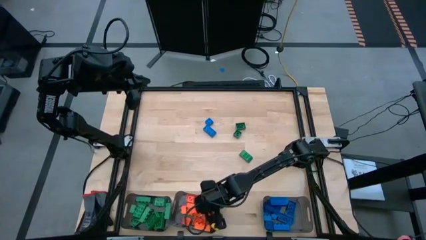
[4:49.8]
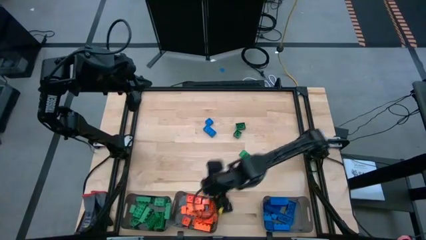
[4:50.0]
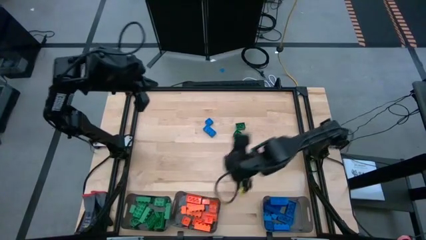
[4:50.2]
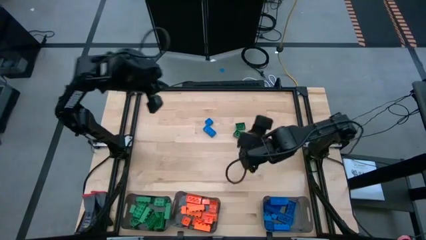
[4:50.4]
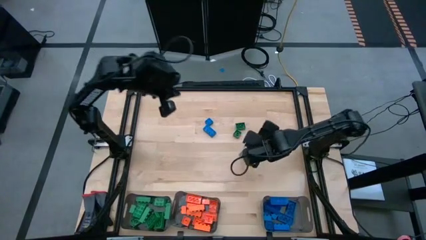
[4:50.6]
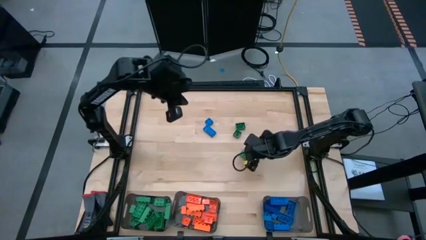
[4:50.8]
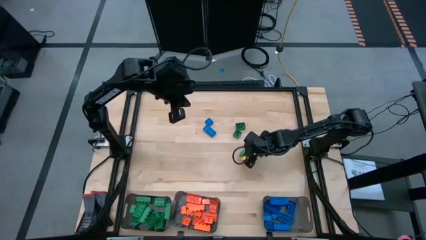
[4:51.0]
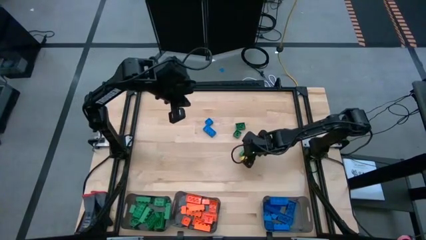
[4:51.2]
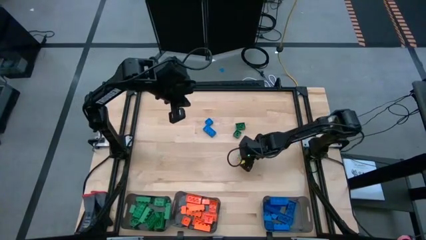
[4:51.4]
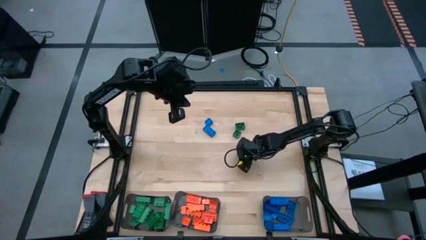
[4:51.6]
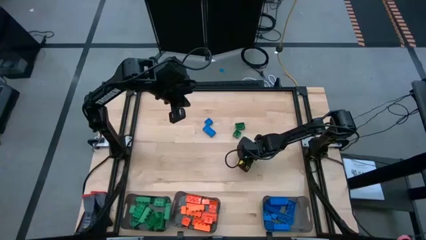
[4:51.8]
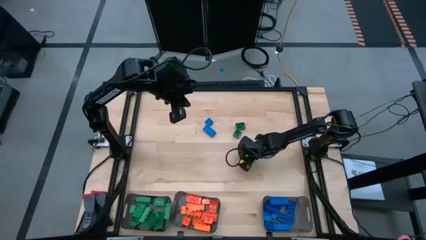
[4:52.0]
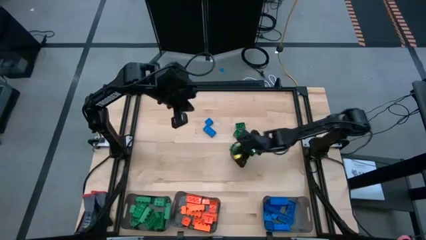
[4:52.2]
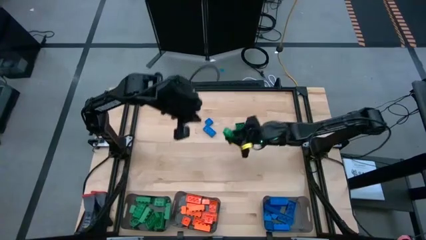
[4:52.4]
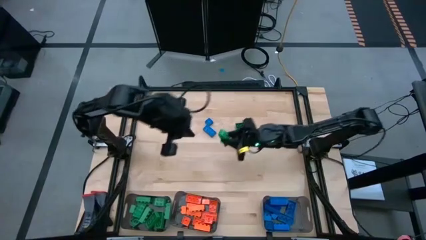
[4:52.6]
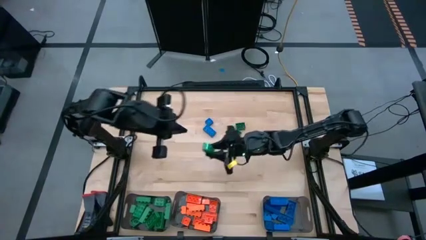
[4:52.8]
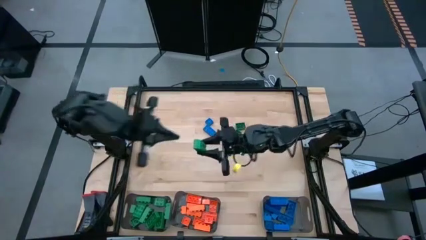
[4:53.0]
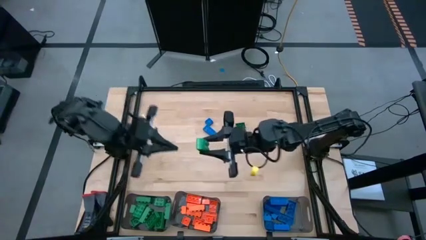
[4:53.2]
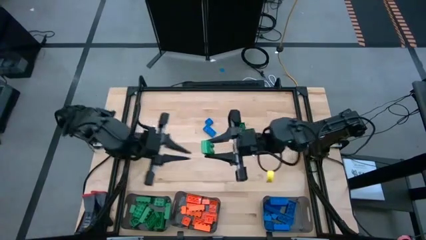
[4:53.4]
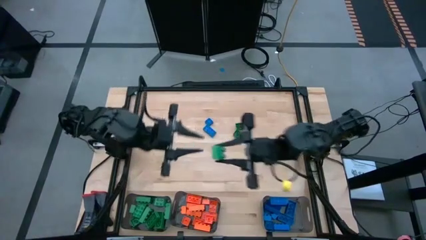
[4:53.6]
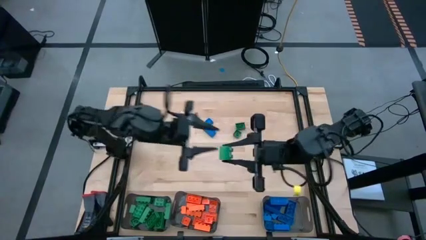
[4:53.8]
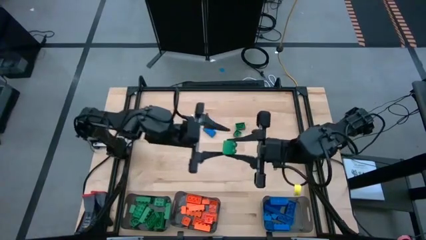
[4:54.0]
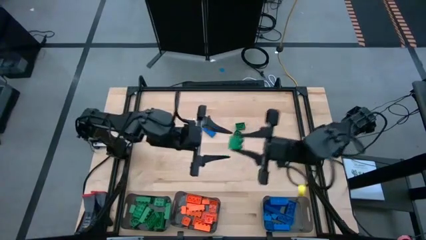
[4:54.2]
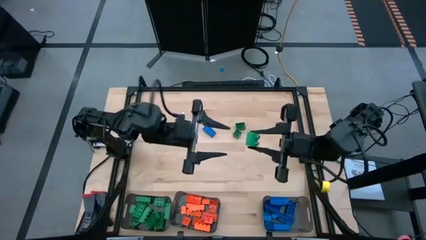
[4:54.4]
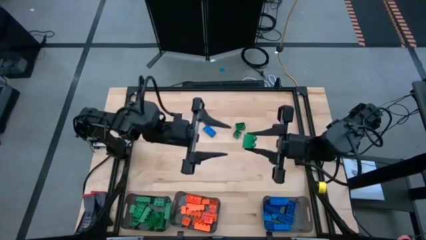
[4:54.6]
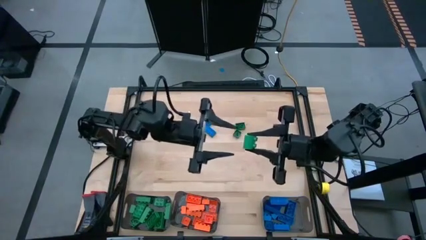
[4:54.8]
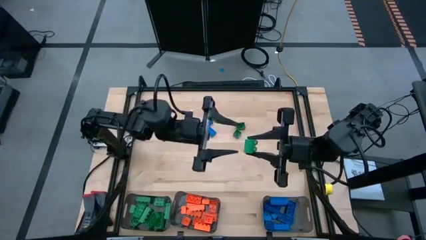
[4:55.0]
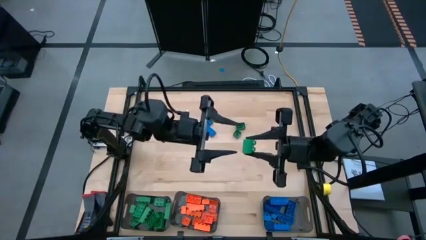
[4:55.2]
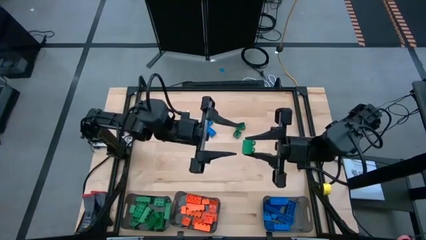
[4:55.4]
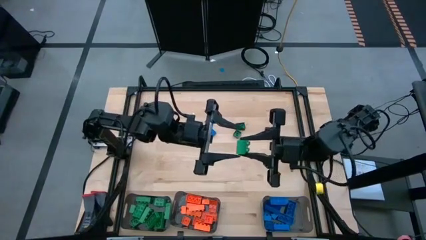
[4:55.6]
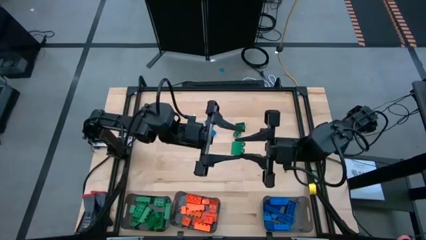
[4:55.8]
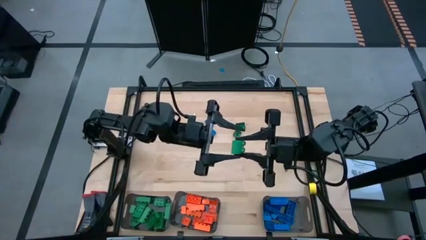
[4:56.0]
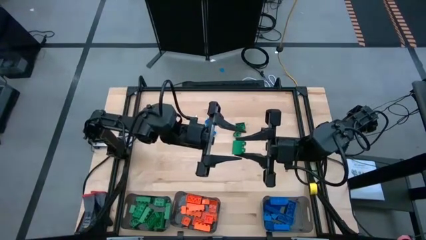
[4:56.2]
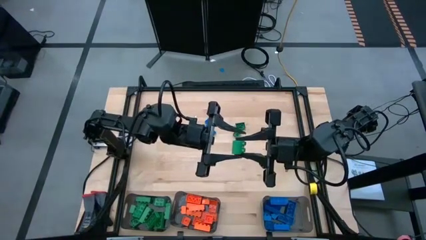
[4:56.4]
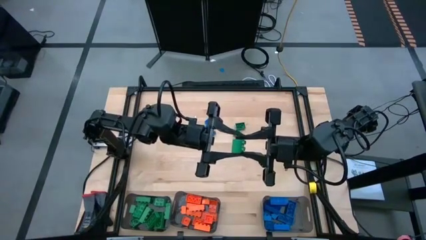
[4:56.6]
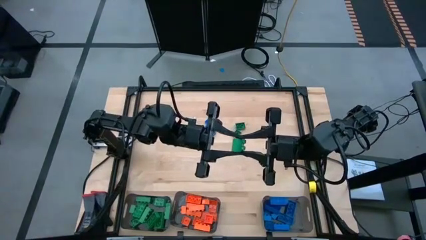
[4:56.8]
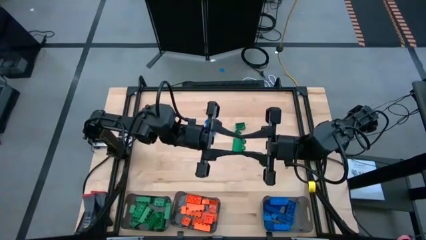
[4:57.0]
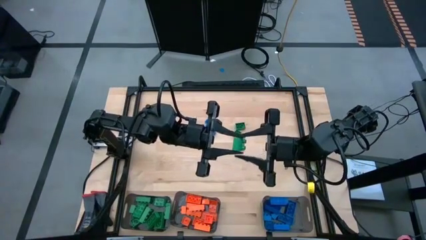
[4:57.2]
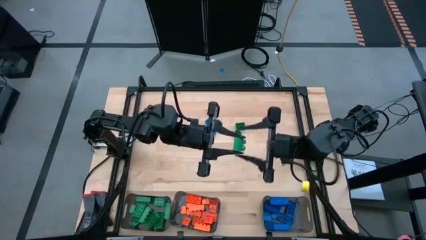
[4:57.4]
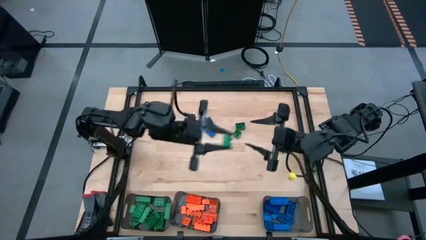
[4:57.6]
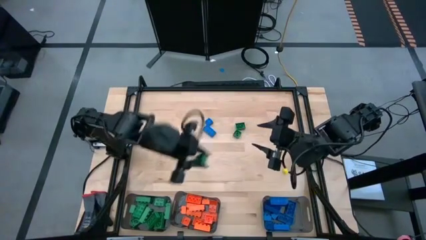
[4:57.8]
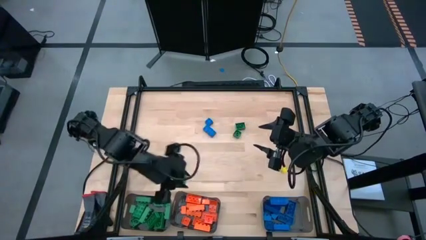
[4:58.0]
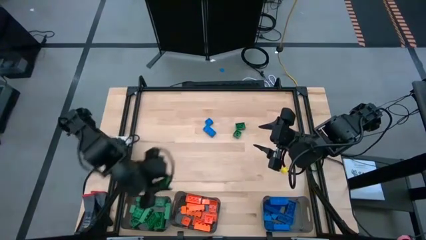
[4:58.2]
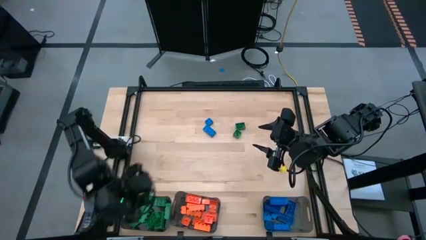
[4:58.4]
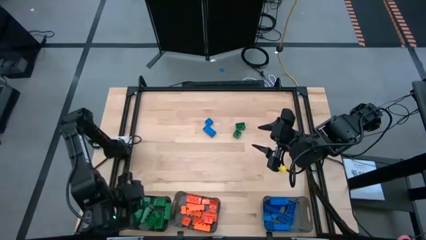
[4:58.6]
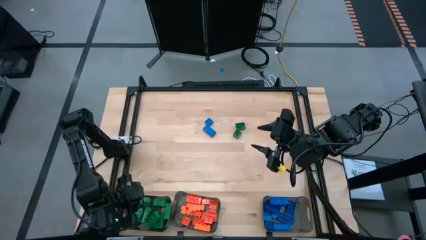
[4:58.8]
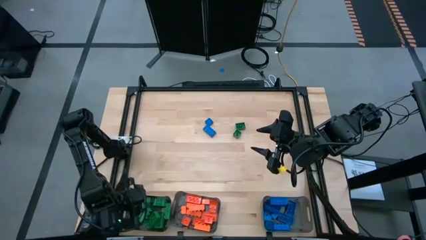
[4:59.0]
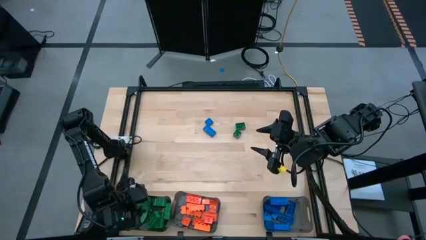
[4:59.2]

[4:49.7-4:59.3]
Task: Sort blocks
Put the green game piece into the left black bin

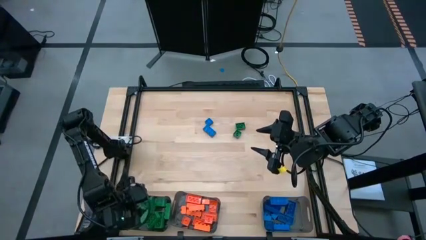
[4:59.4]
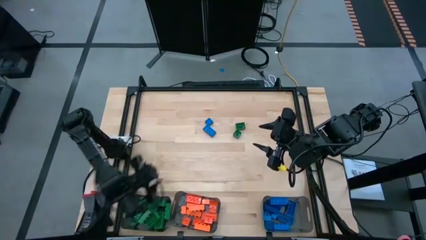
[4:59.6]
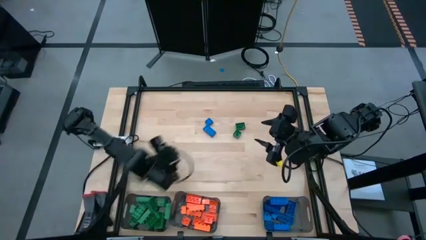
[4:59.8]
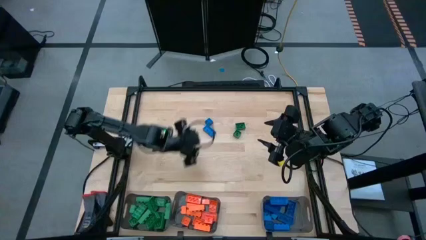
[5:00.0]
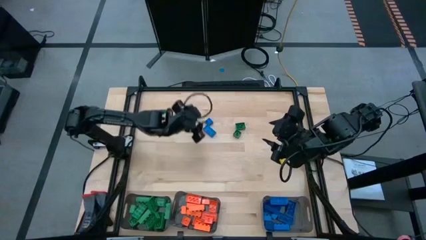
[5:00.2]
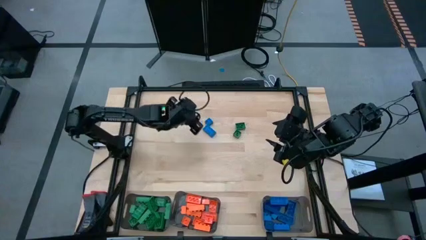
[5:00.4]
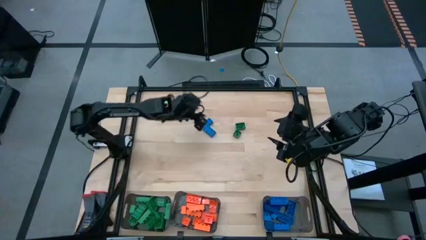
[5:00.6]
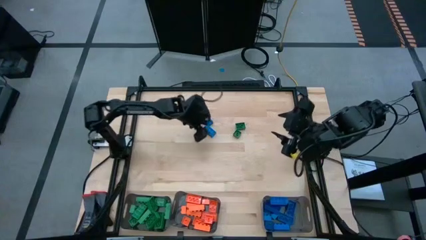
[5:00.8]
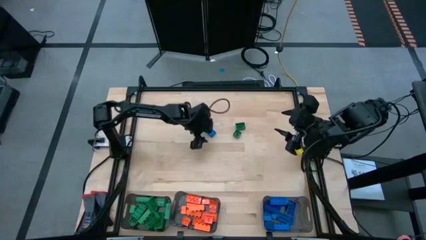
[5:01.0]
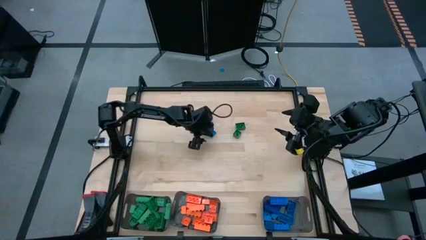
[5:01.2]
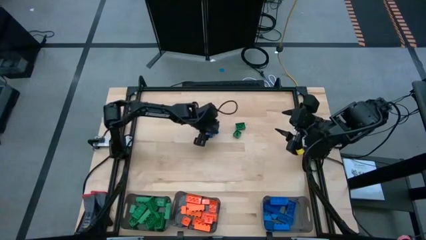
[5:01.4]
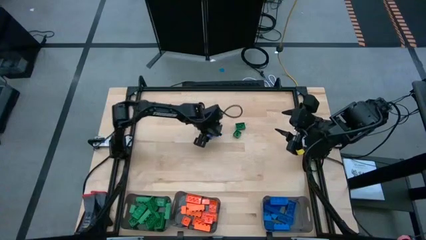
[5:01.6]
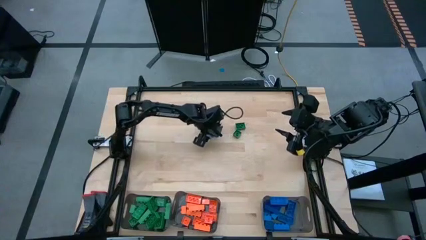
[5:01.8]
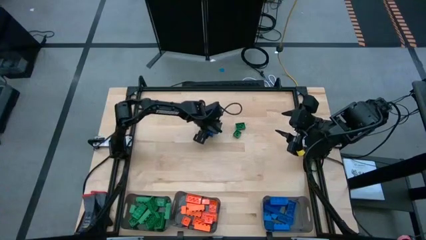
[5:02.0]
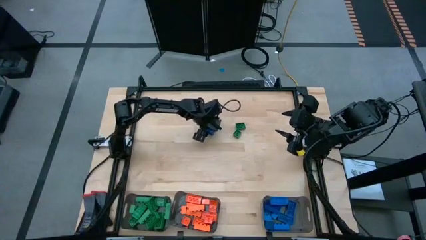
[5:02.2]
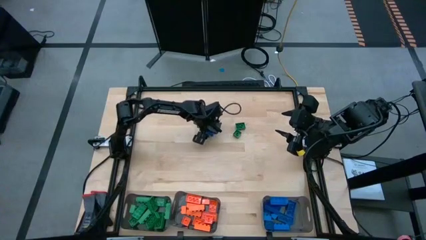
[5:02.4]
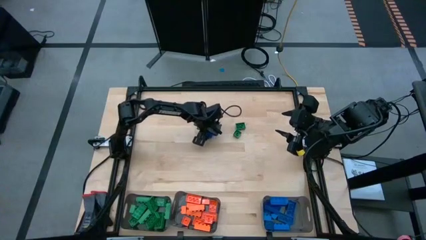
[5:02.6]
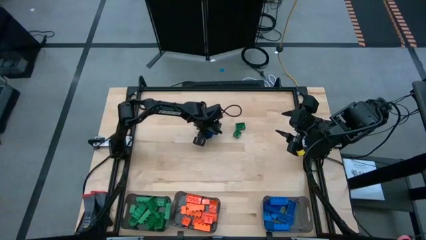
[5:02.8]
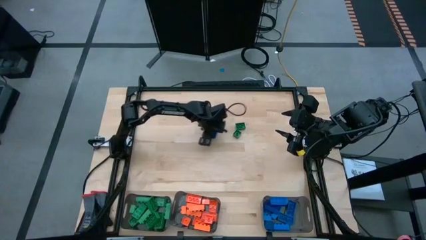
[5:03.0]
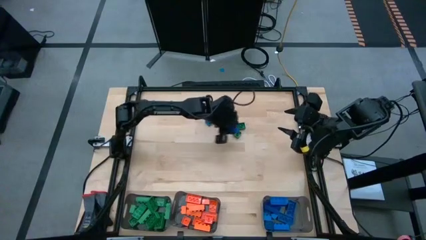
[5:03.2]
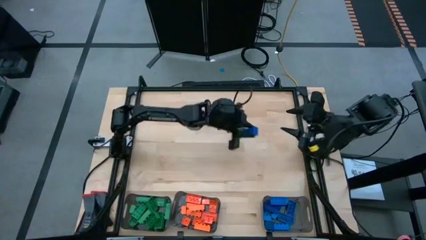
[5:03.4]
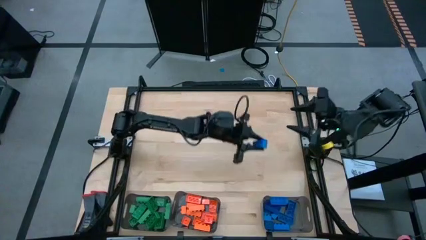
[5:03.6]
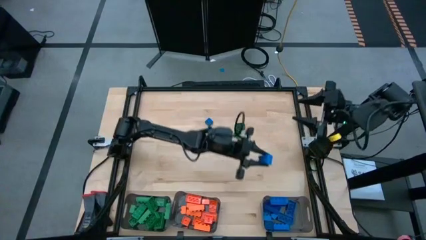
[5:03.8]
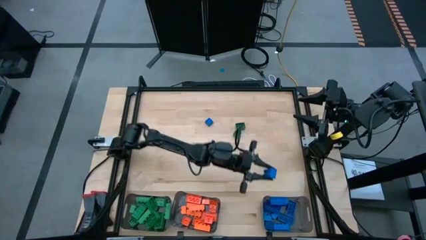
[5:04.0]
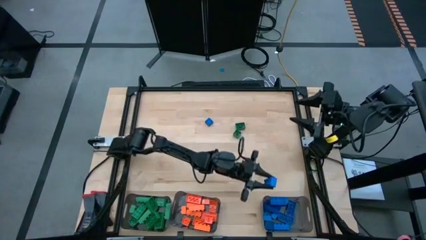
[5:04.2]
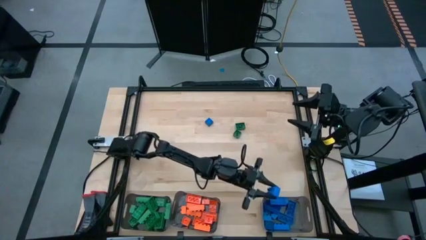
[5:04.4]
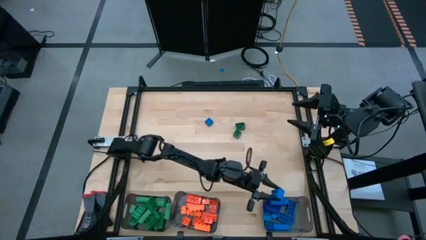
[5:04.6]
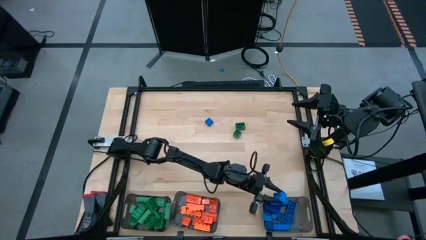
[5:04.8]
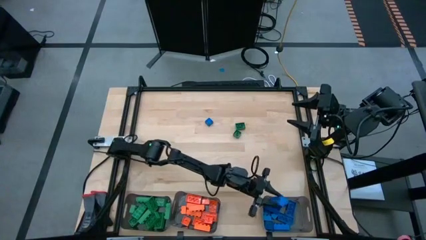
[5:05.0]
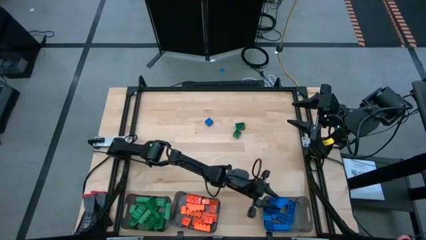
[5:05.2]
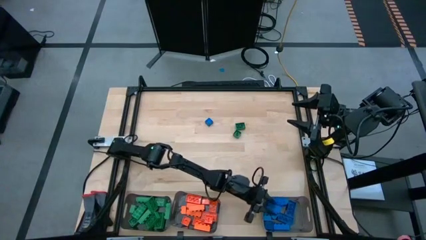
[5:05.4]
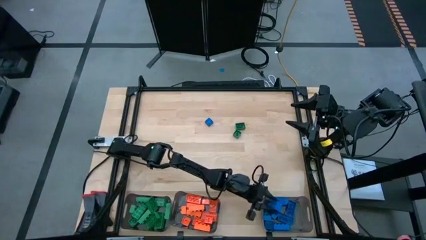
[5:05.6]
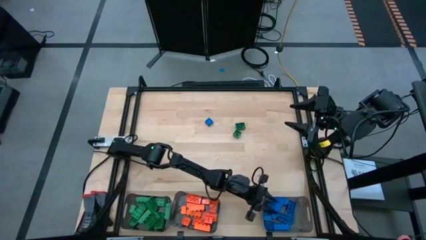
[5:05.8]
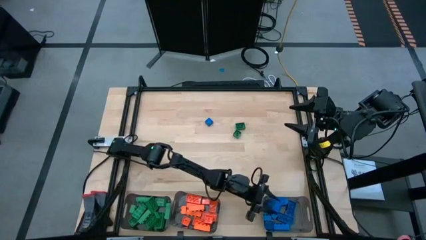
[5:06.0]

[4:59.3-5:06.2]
Put the blue game piece into the right black bin
